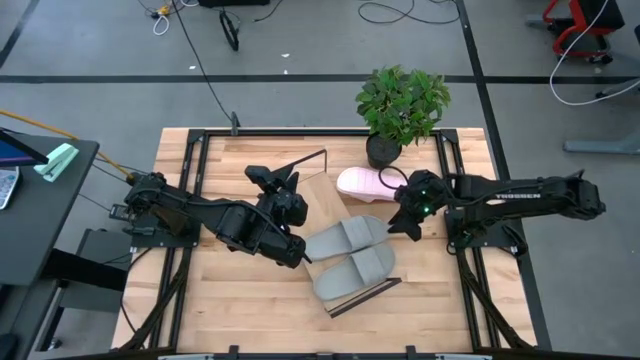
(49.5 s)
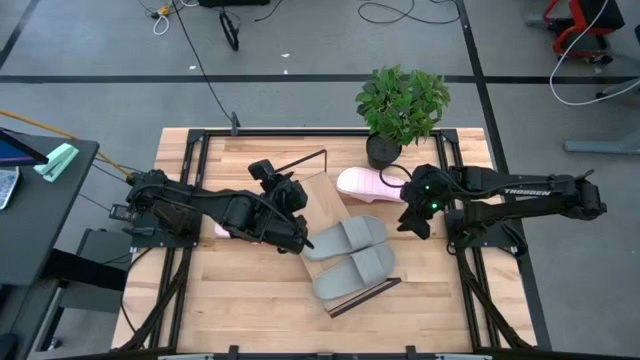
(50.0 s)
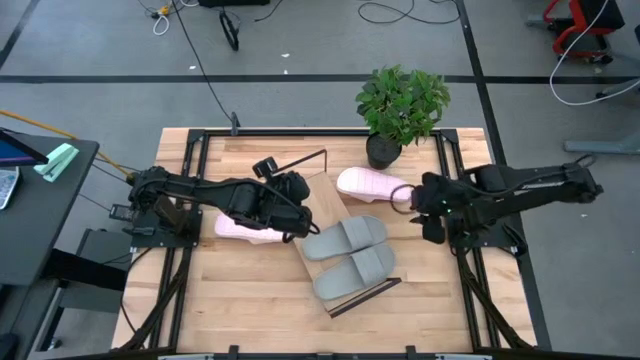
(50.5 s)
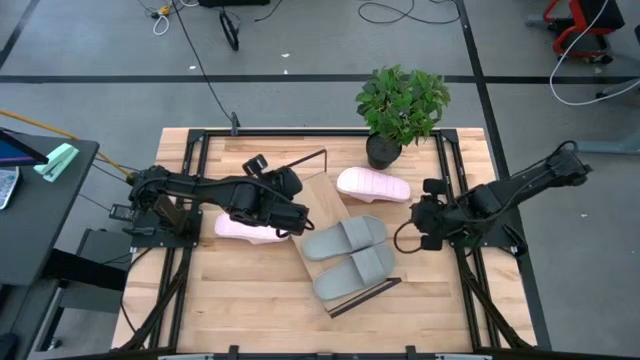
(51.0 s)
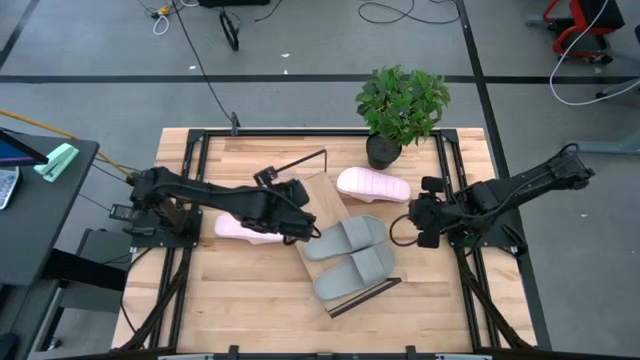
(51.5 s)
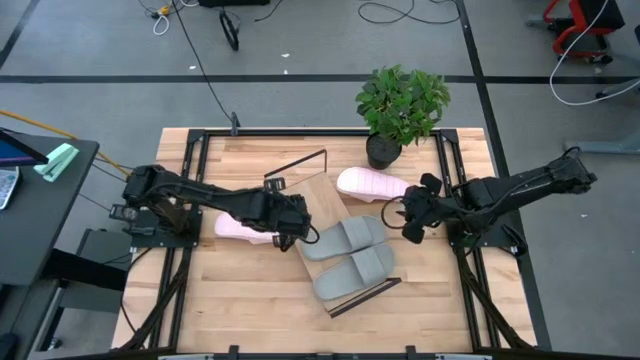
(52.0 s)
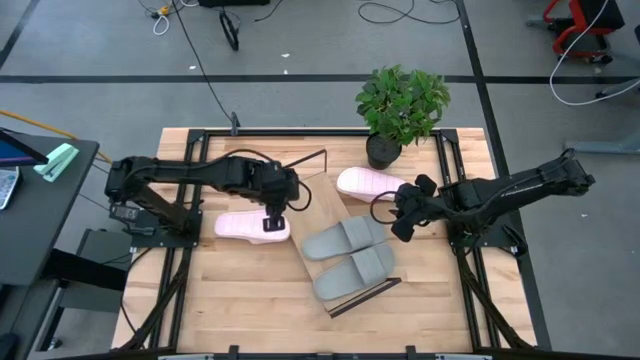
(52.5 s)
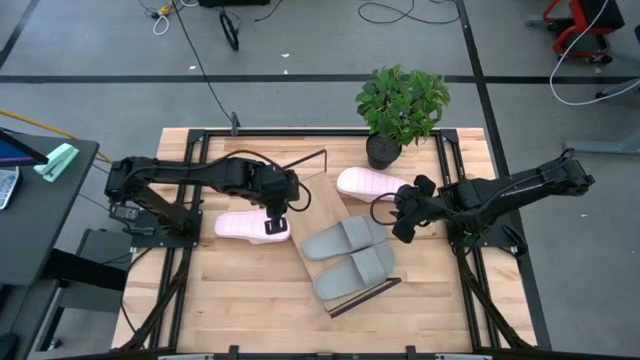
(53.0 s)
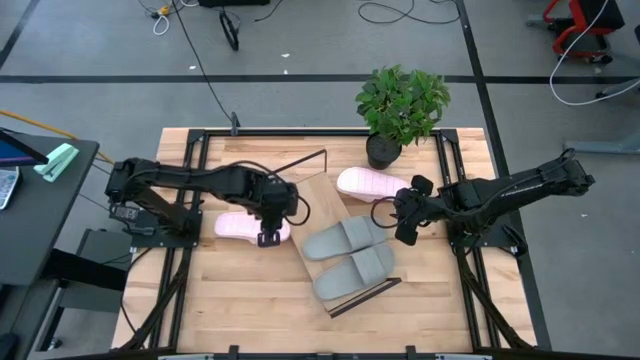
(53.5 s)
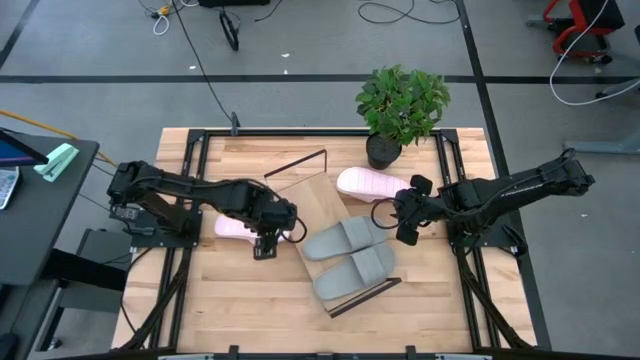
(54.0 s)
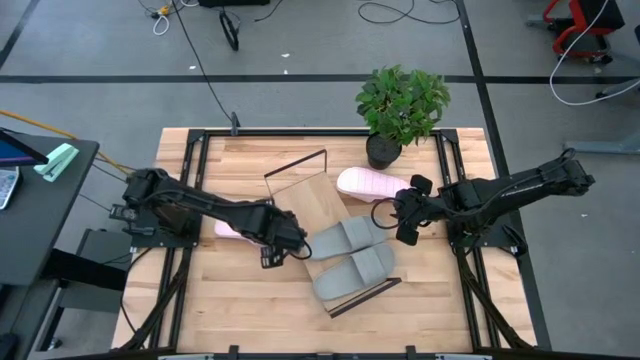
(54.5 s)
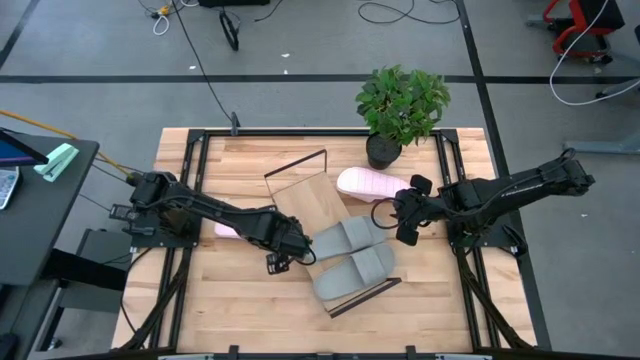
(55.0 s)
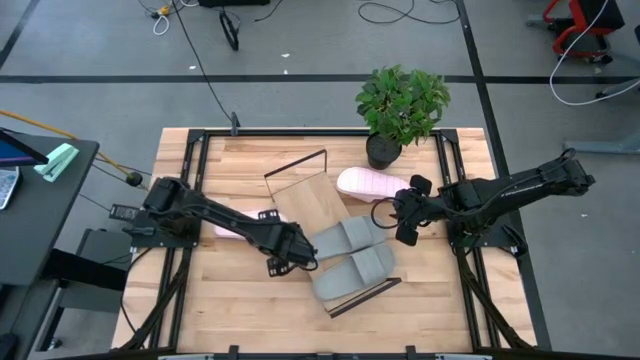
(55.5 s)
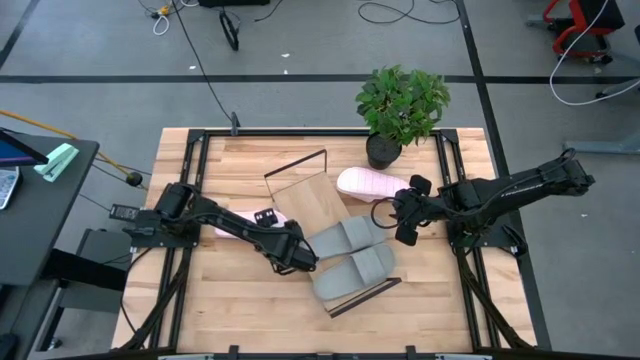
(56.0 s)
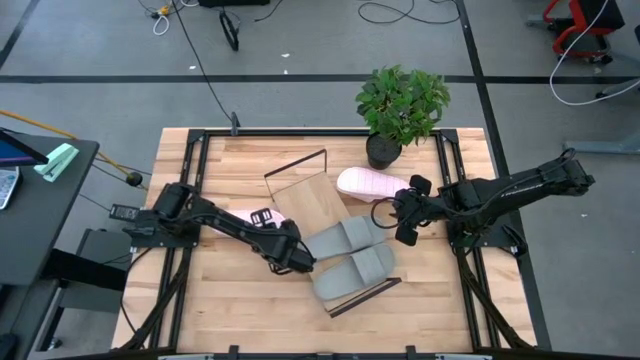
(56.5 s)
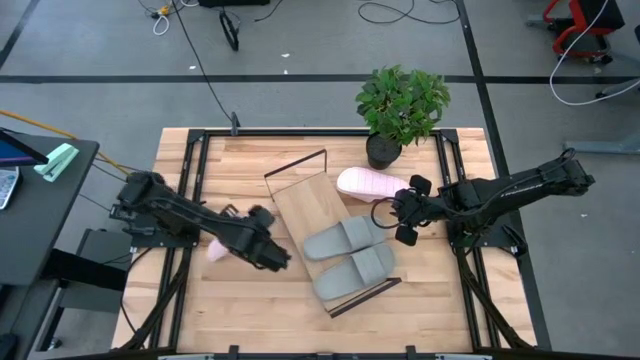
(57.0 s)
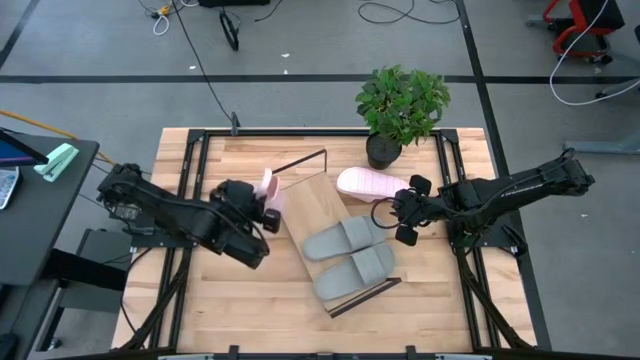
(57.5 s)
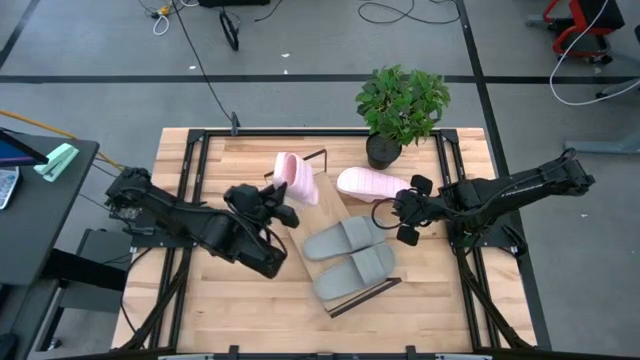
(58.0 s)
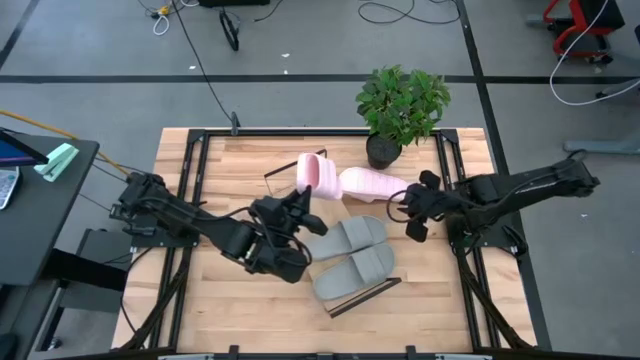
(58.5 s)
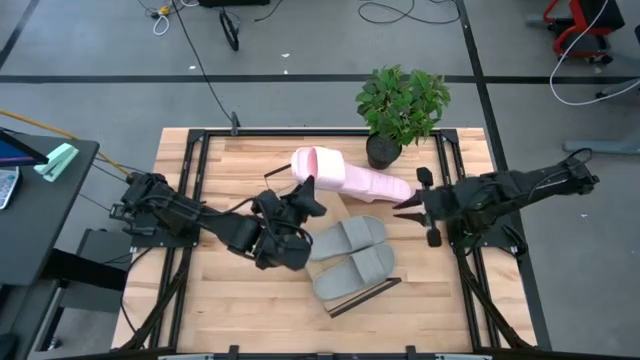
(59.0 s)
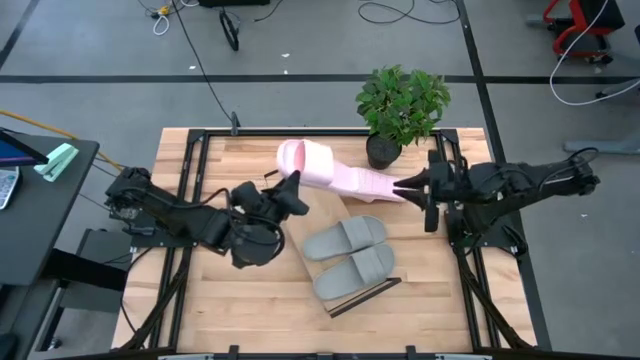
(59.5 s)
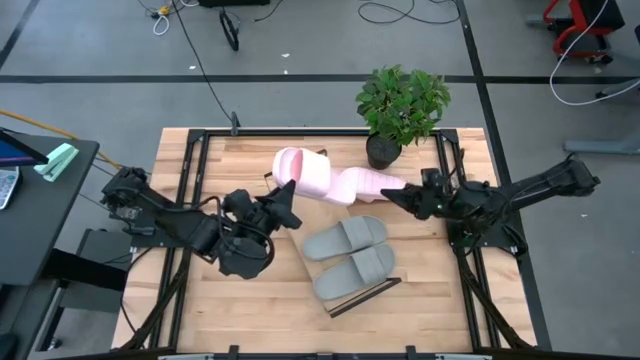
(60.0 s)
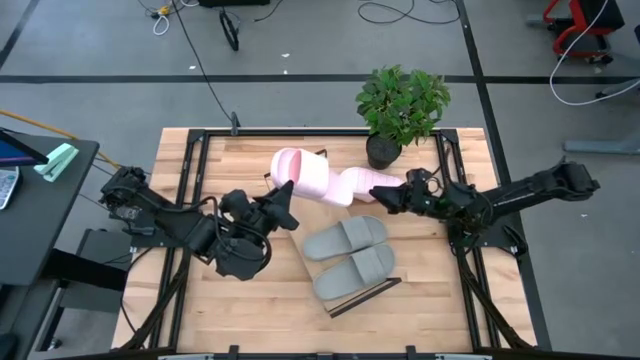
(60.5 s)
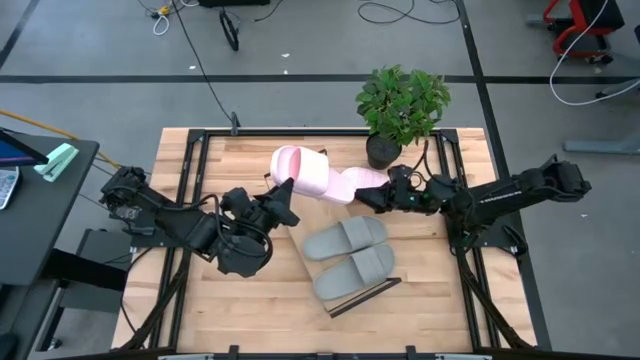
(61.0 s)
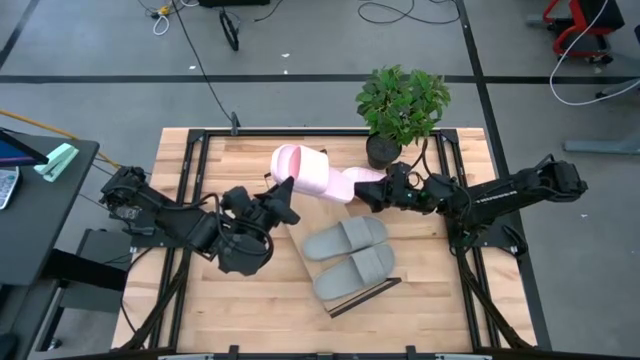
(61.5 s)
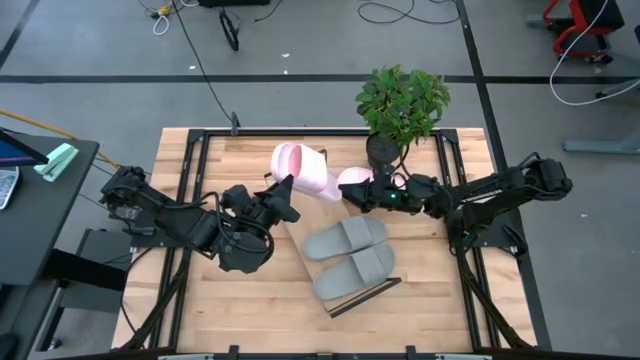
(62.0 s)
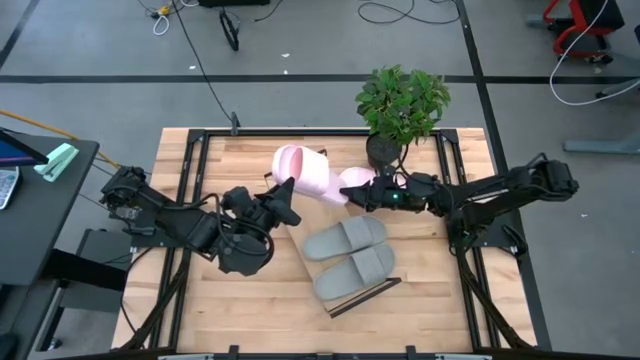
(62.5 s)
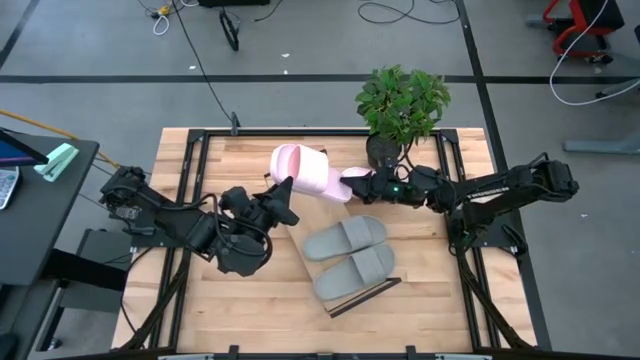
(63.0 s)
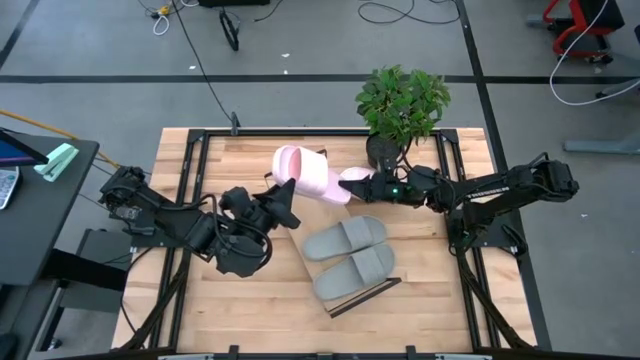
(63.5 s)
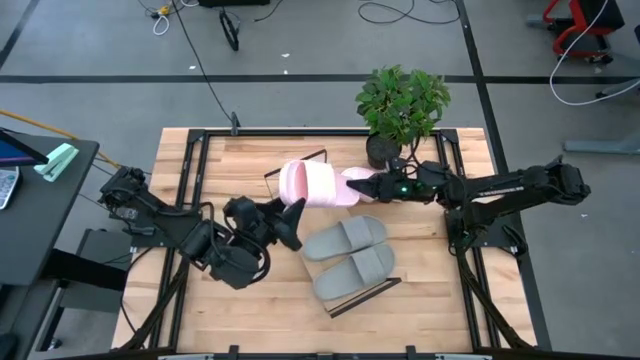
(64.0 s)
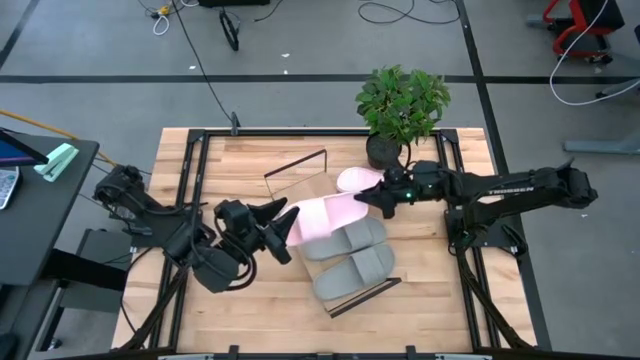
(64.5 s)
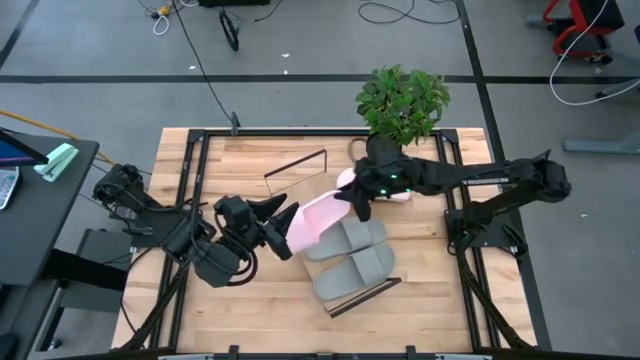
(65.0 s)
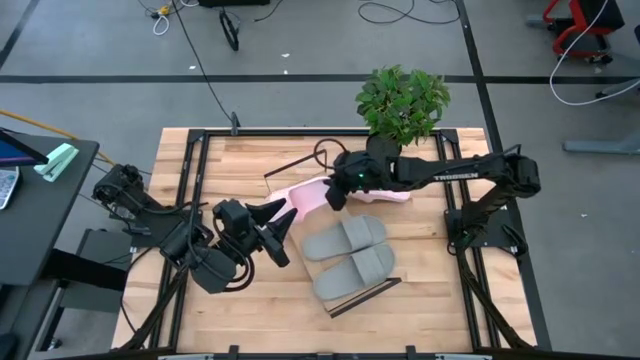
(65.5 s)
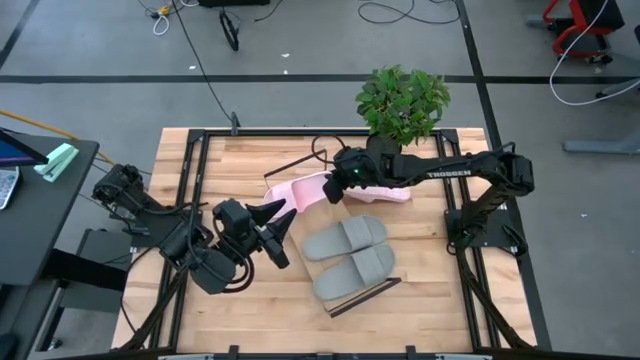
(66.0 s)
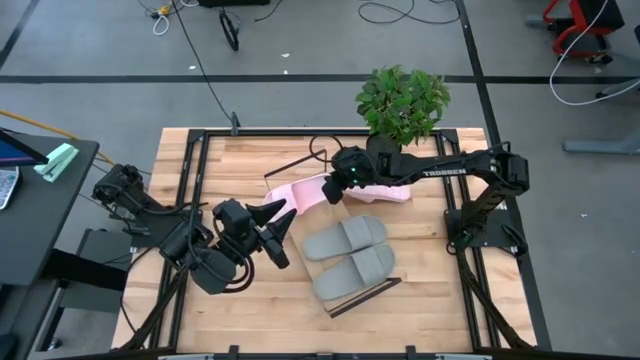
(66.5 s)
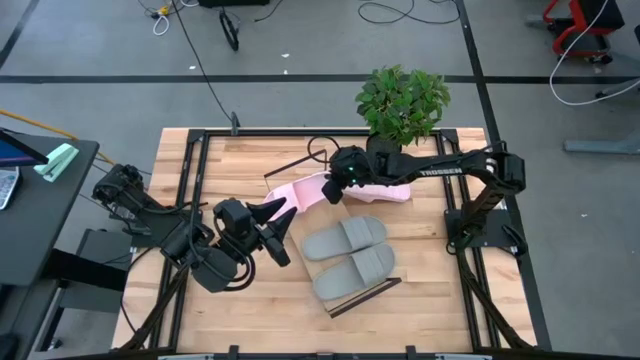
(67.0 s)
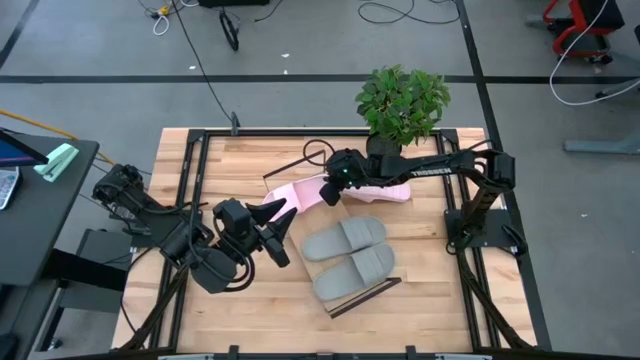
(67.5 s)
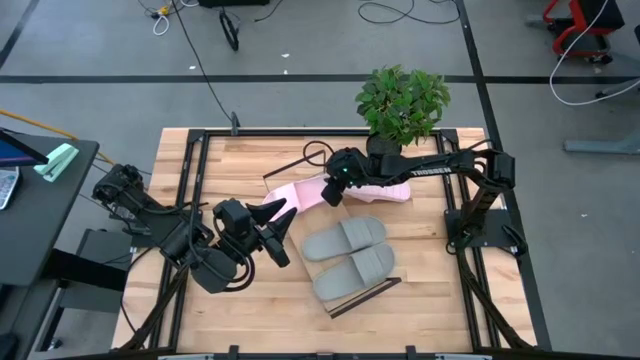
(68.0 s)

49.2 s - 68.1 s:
Task: Pick and place slides into the shelf
Put the left pink slide on the shelf

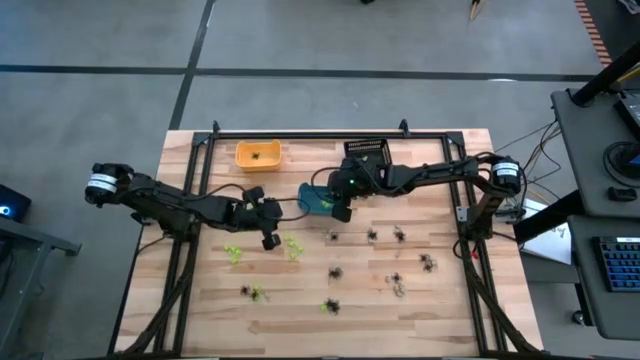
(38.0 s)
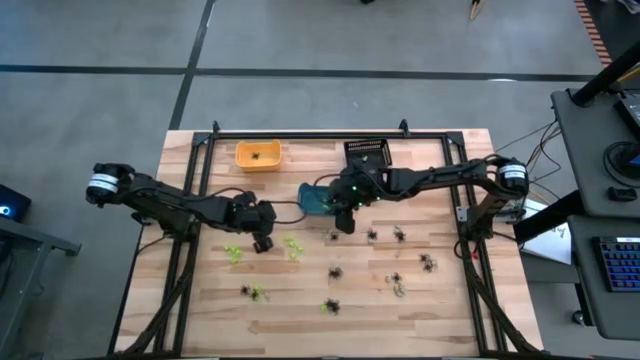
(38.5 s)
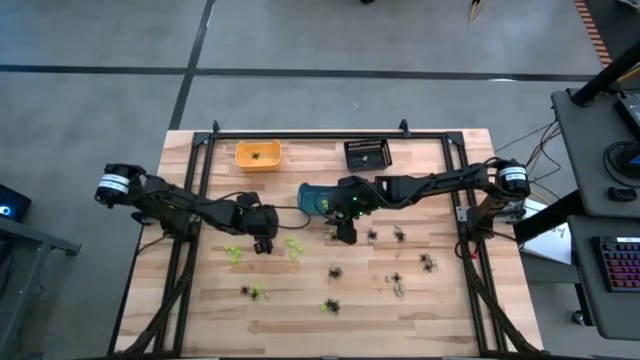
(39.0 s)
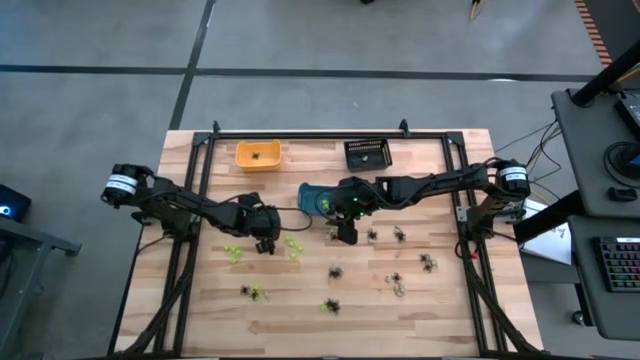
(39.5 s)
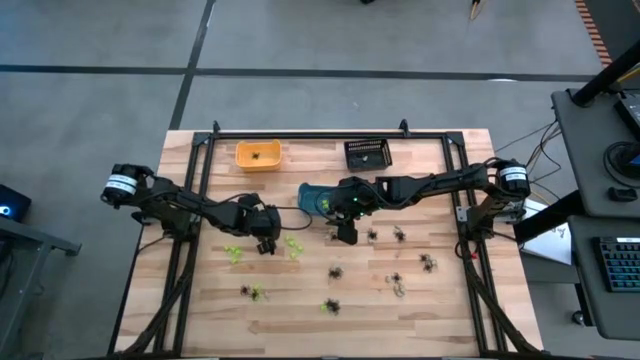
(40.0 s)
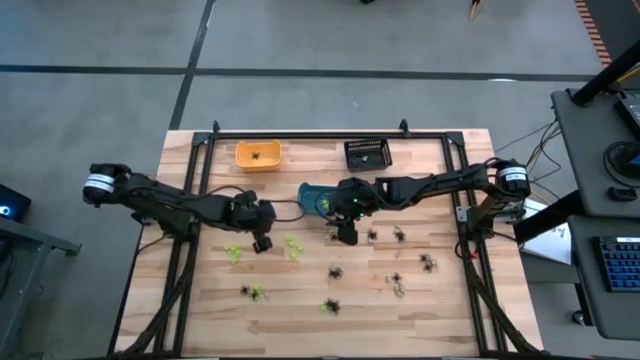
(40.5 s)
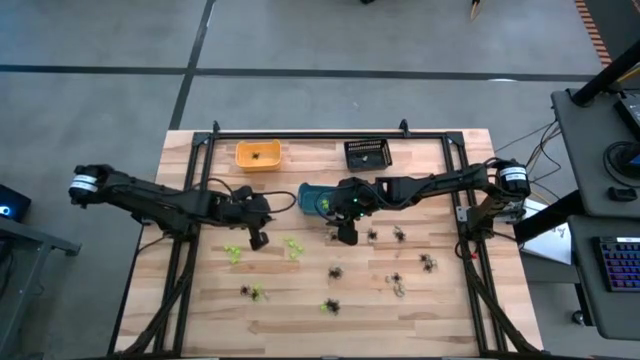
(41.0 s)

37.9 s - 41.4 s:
Task: Sort Halloween decoration
Put the black spider toy into the yellow bin
